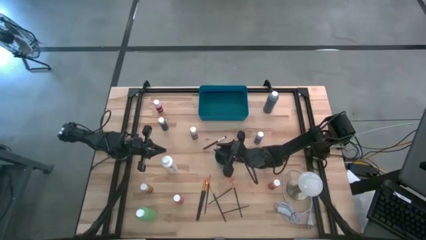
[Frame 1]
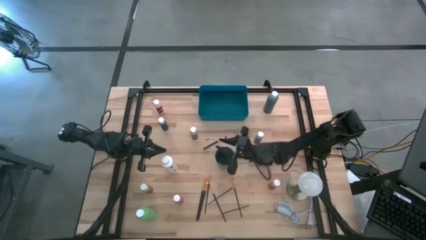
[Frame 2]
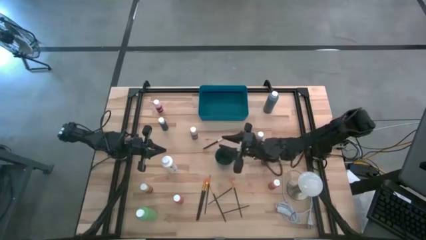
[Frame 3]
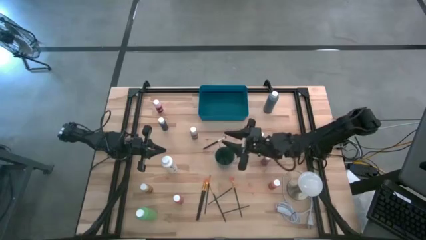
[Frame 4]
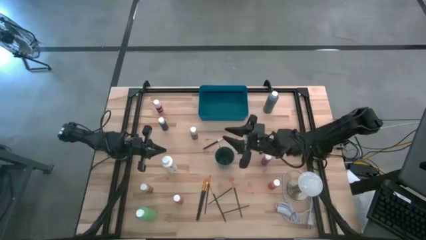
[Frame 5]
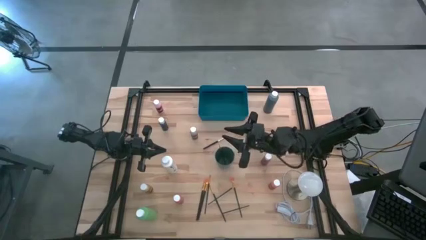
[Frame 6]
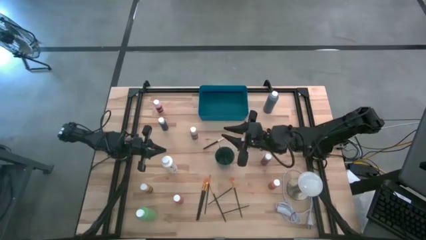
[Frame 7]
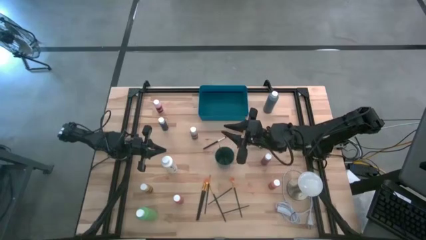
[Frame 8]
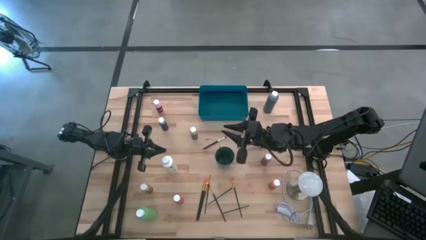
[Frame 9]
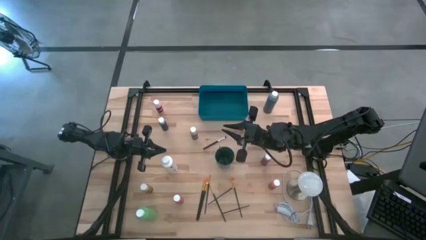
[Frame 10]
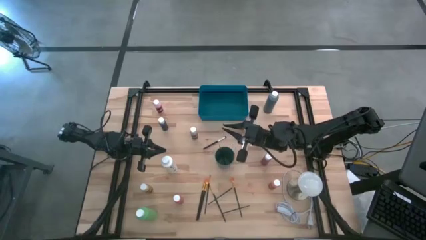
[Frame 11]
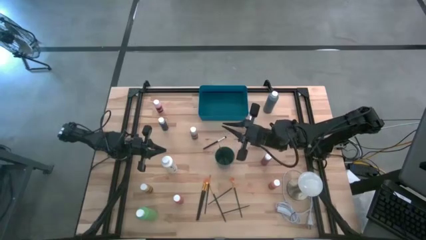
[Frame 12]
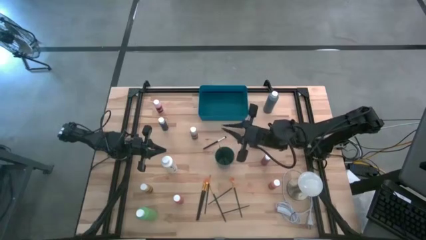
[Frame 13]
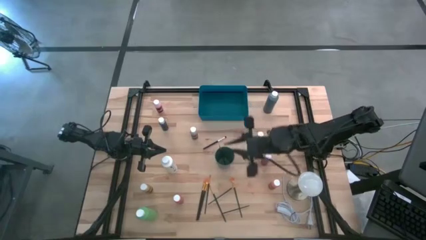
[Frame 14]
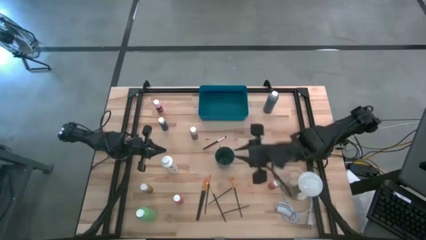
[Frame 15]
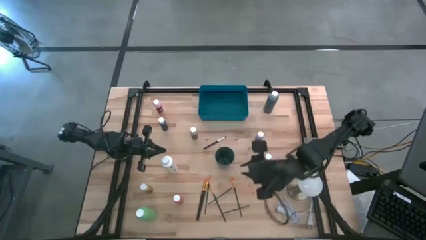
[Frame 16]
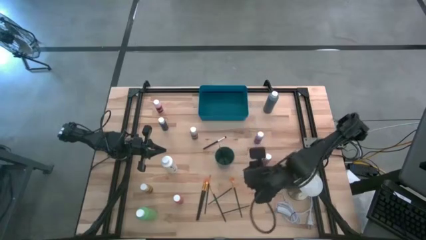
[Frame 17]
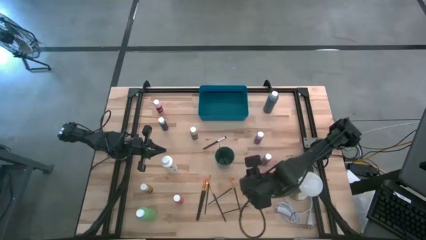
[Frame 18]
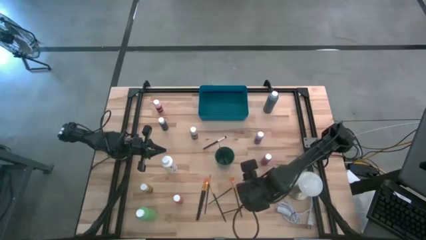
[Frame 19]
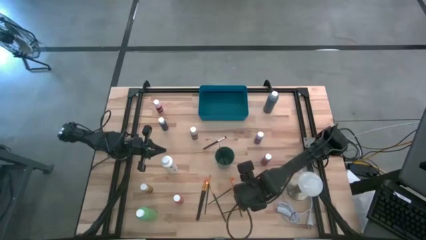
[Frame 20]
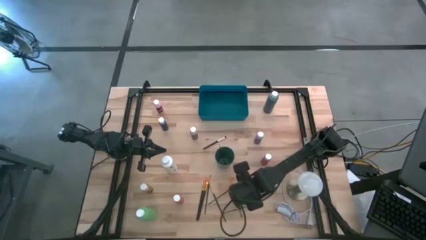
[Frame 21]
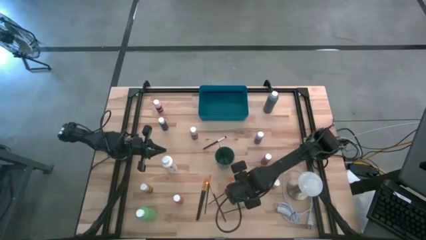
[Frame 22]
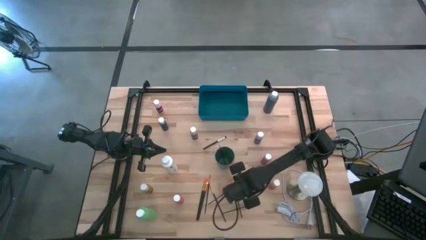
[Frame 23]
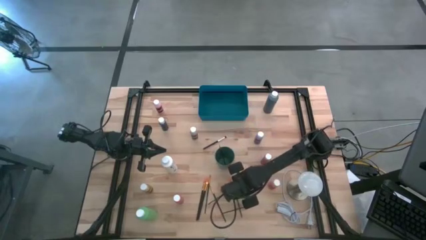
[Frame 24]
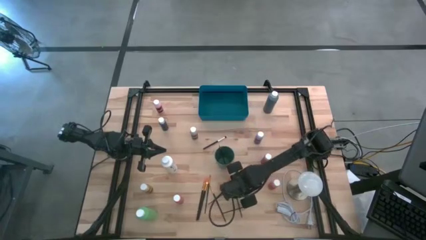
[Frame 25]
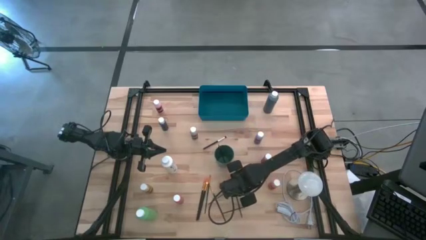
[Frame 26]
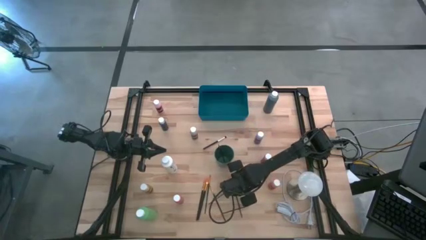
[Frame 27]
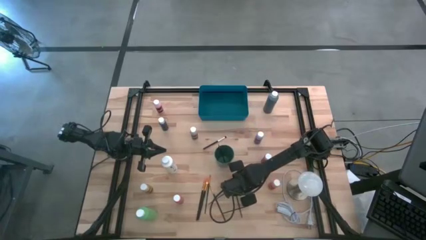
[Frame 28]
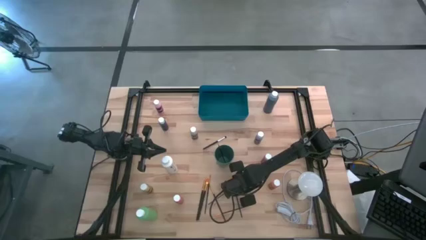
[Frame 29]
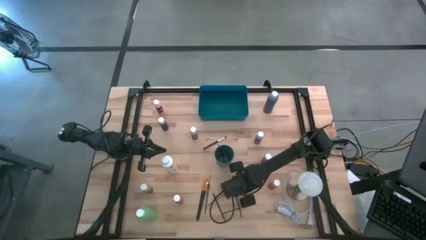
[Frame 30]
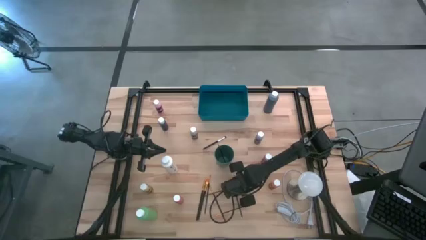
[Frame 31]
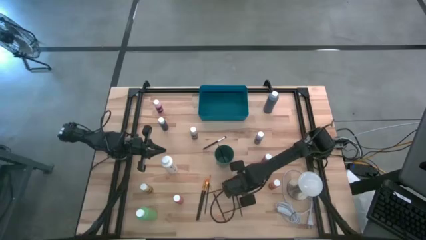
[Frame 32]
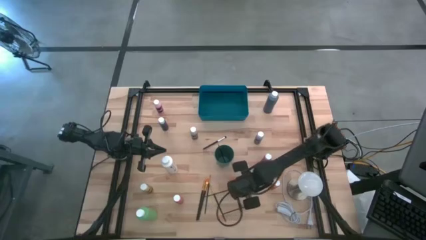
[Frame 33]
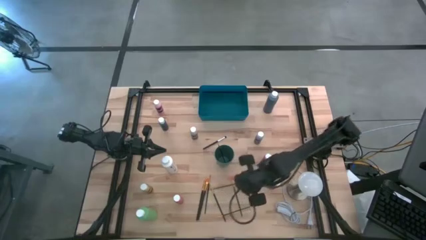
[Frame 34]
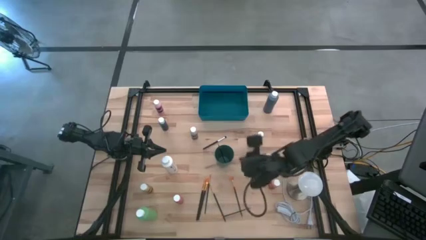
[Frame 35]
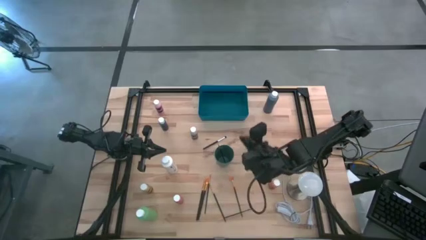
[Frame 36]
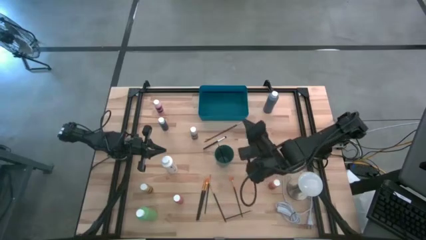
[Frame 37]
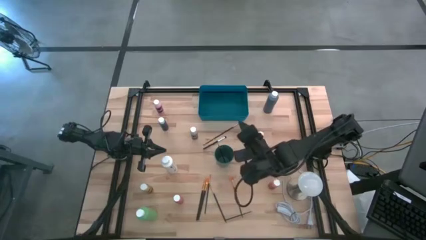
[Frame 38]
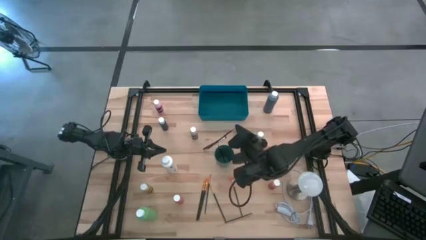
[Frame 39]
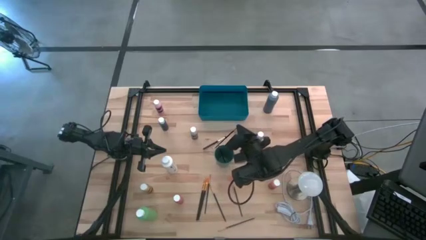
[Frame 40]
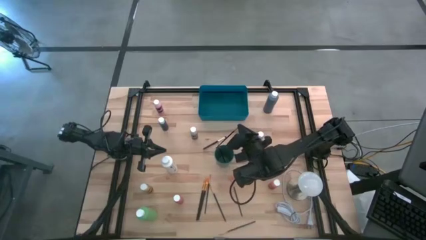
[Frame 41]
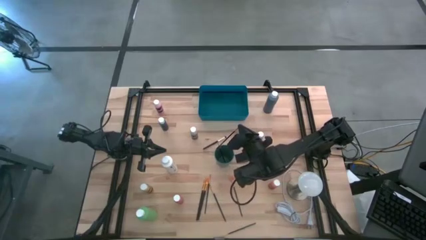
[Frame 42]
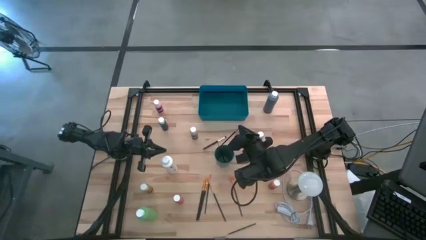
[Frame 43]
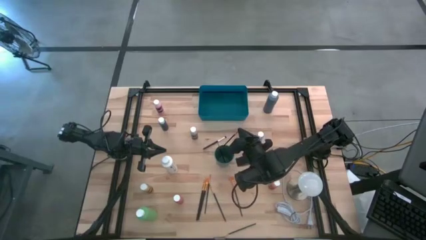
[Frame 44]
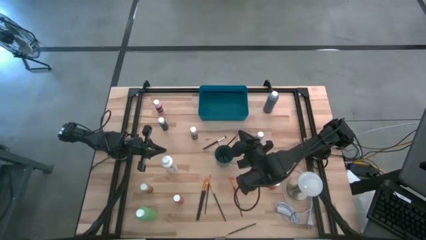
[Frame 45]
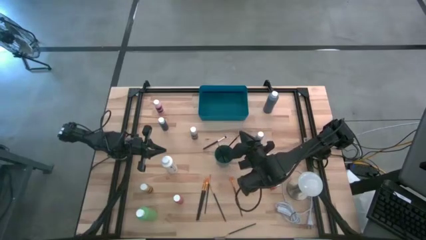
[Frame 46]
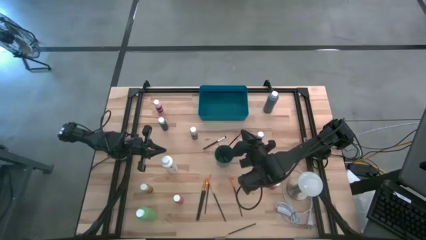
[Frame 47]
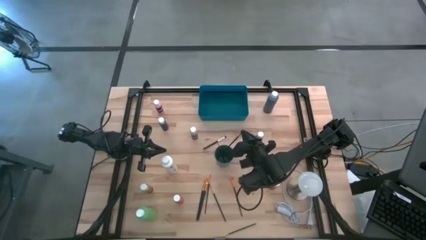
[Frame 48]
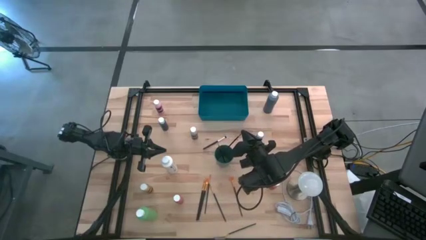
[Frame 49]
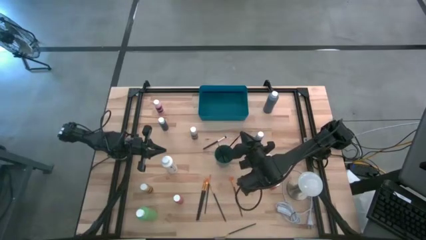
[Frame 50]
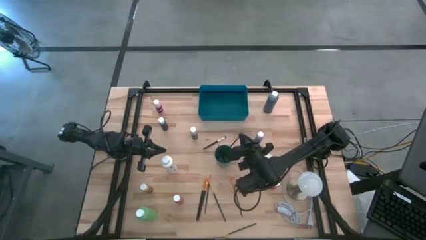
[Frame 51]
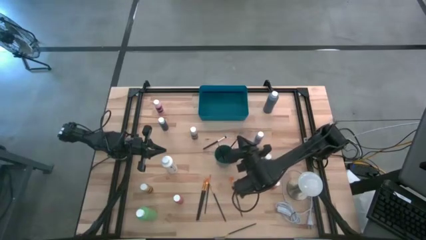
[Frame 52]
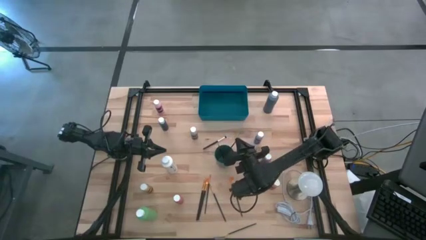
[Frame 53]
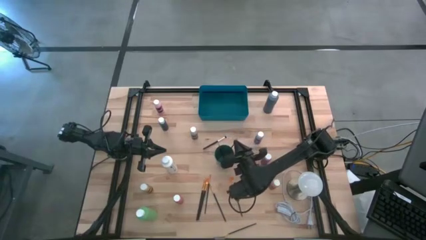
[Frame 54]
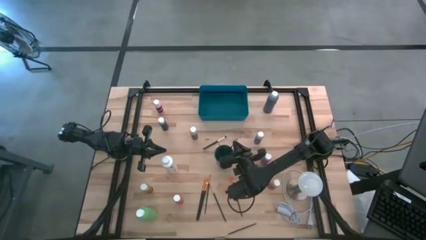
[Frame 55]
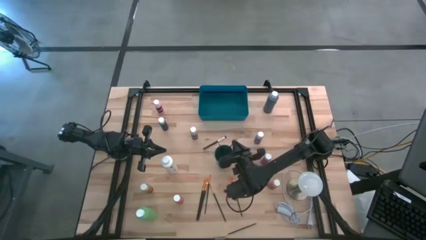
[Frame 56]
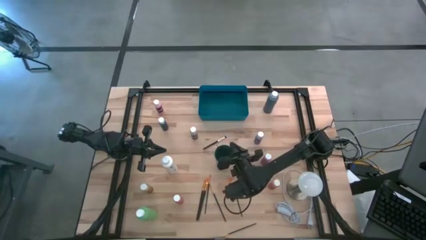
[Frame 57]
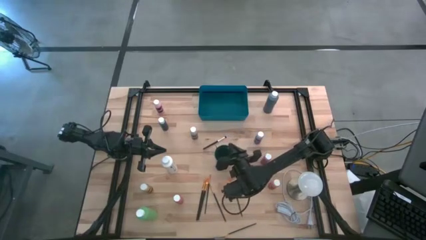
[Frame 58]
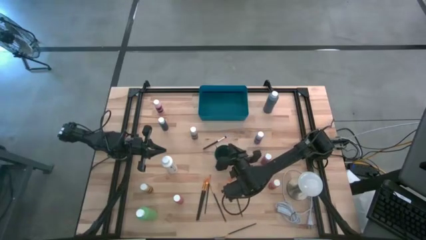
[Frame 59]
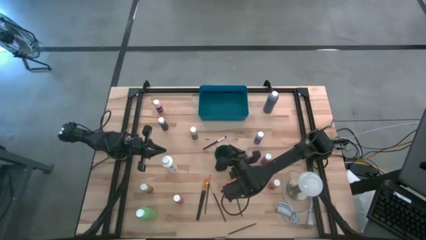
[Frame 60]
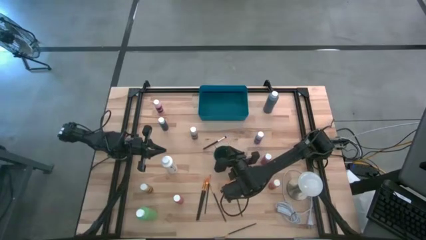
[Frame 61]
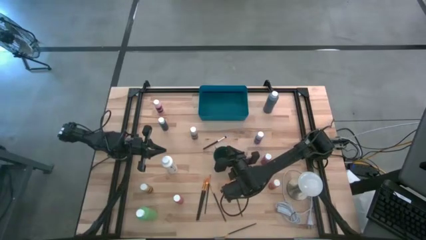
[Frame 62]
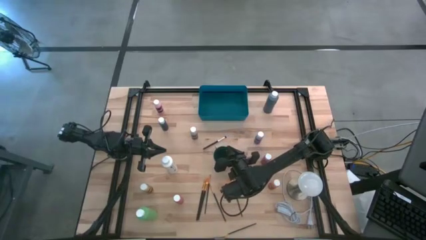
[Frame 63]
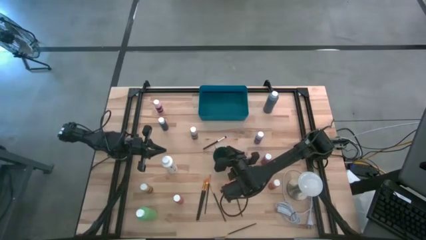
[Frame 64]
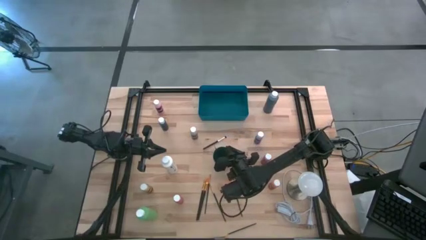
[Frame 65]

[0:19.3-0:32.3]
Task: Pick & Place Paint Supplies
Put the yellow paint brush into the green cup
